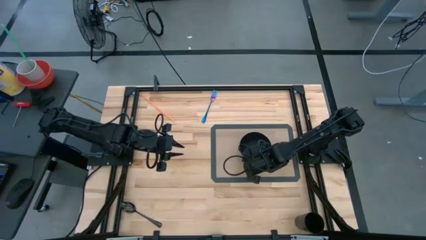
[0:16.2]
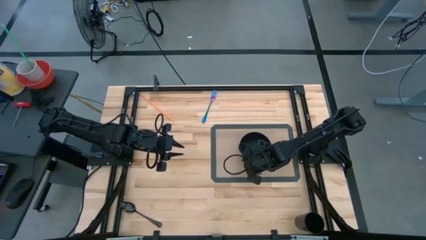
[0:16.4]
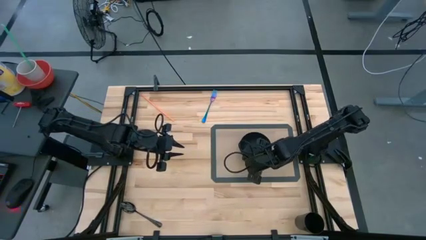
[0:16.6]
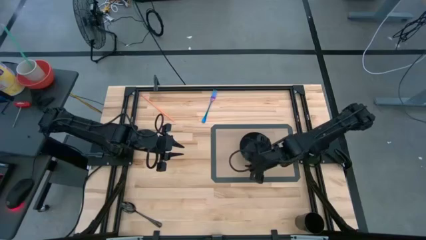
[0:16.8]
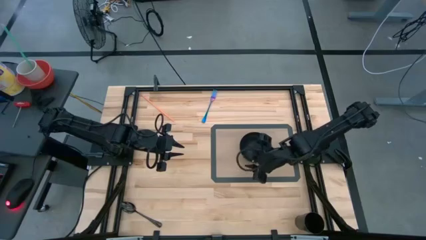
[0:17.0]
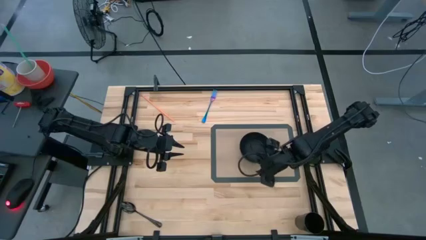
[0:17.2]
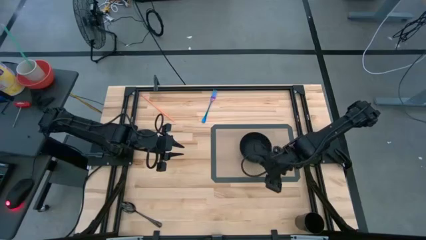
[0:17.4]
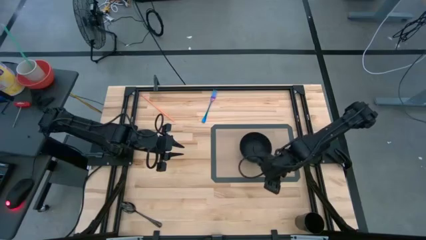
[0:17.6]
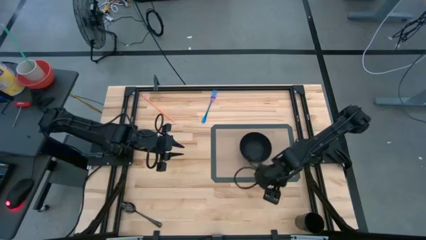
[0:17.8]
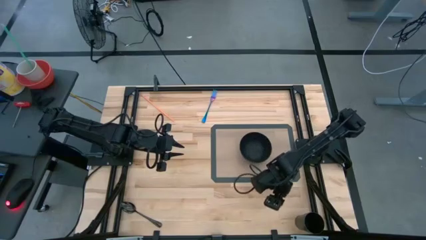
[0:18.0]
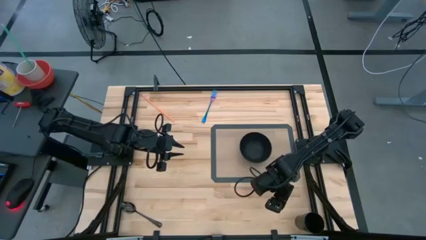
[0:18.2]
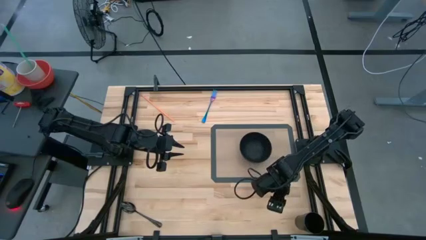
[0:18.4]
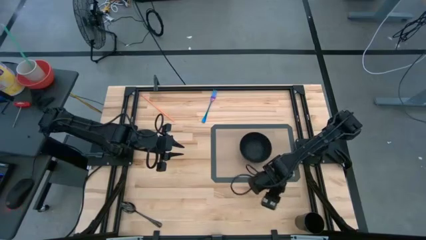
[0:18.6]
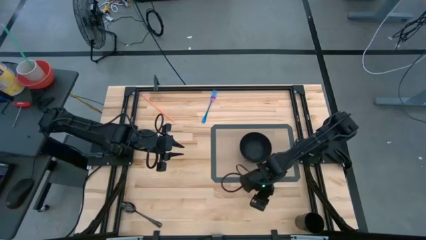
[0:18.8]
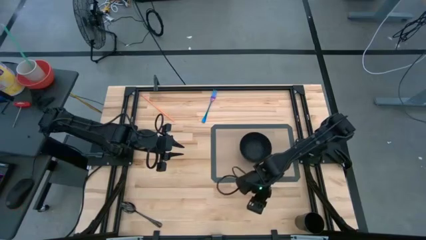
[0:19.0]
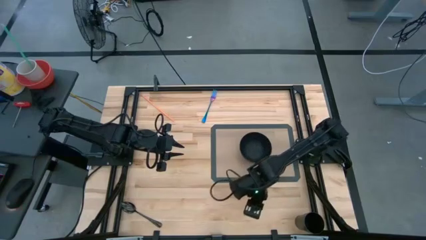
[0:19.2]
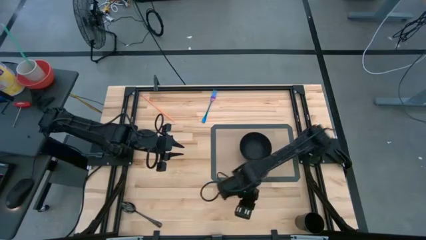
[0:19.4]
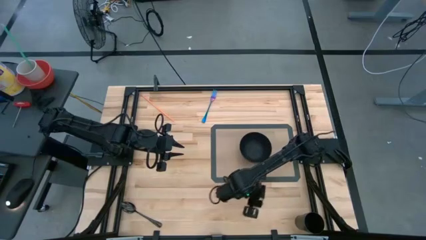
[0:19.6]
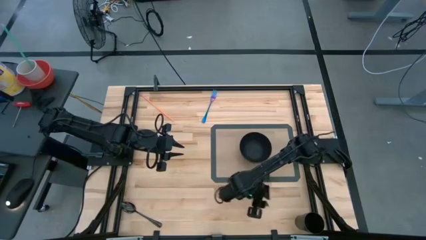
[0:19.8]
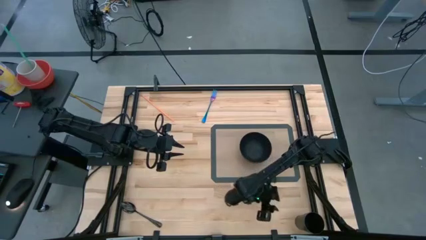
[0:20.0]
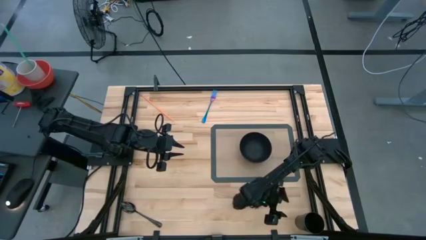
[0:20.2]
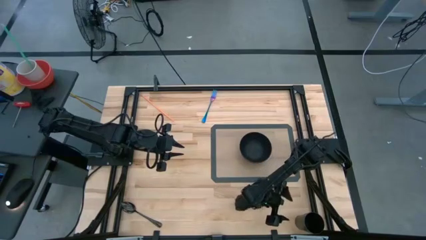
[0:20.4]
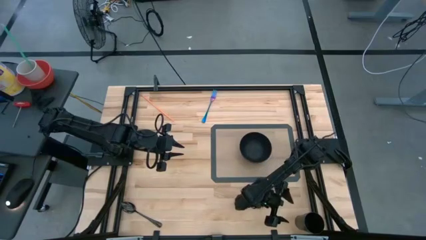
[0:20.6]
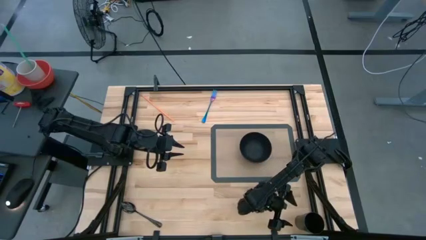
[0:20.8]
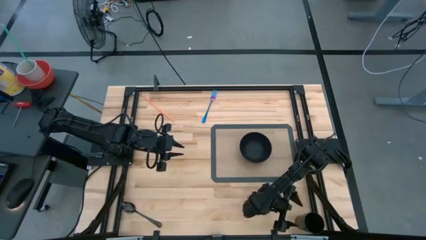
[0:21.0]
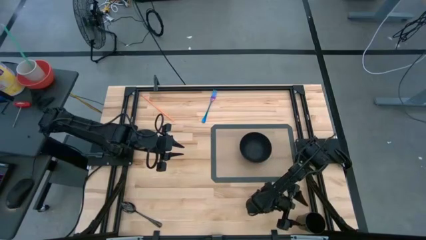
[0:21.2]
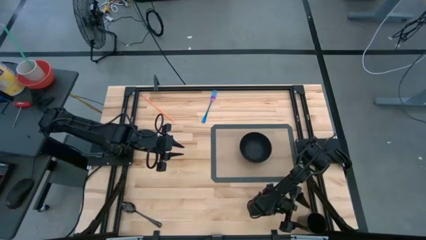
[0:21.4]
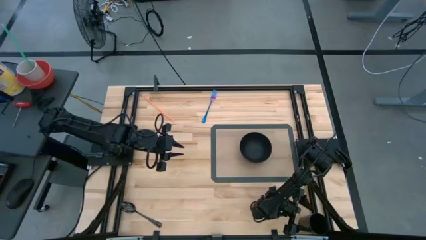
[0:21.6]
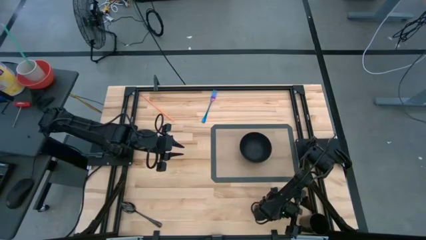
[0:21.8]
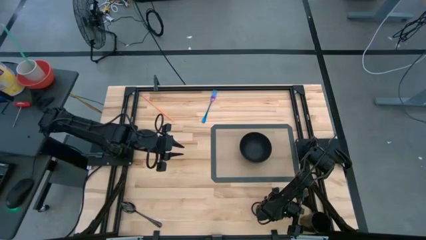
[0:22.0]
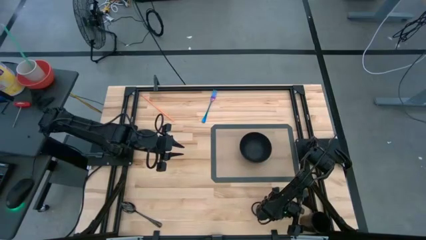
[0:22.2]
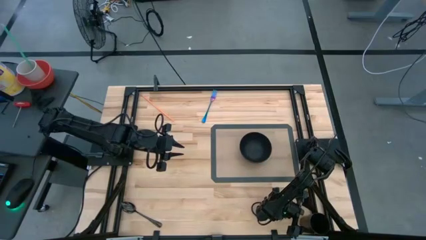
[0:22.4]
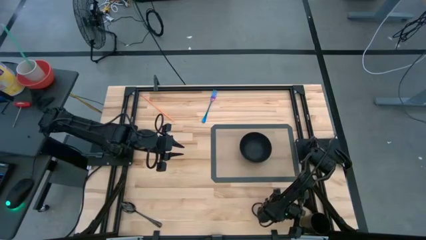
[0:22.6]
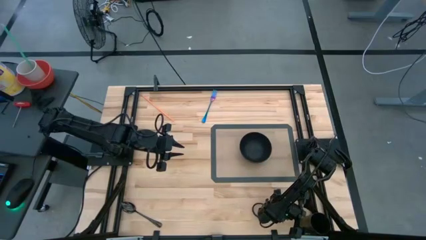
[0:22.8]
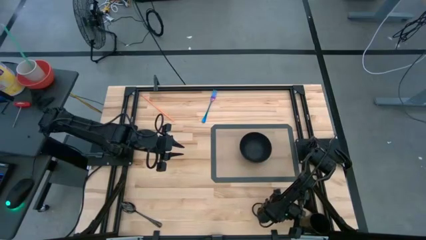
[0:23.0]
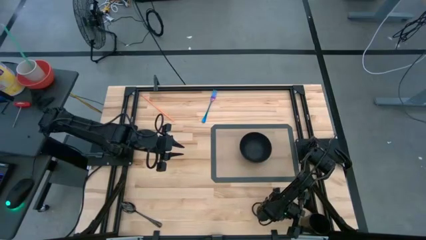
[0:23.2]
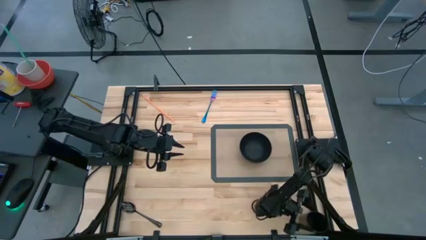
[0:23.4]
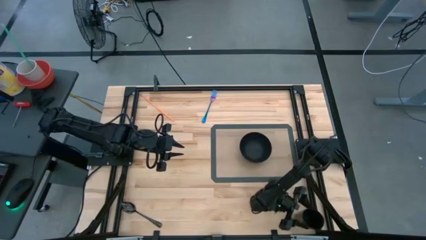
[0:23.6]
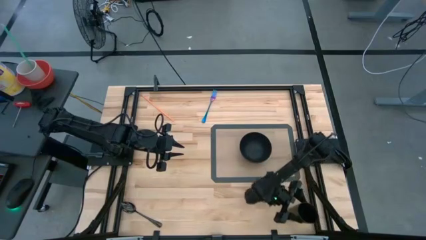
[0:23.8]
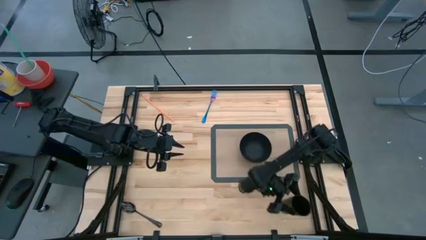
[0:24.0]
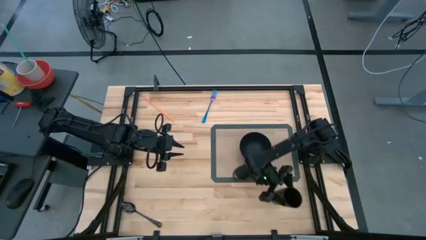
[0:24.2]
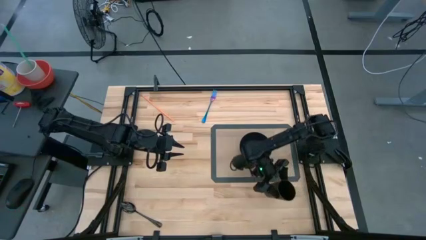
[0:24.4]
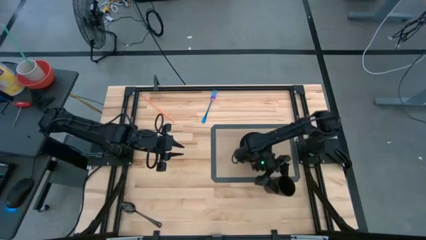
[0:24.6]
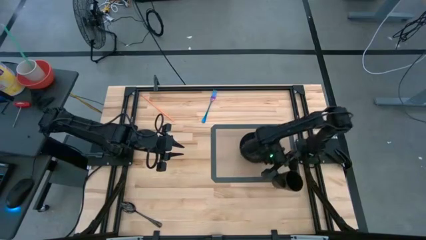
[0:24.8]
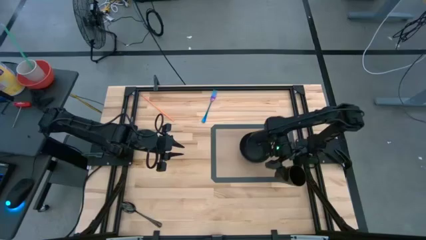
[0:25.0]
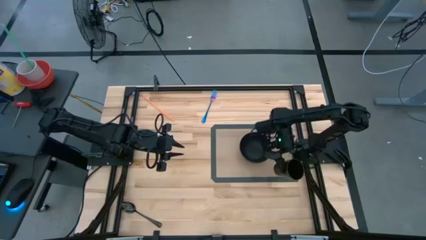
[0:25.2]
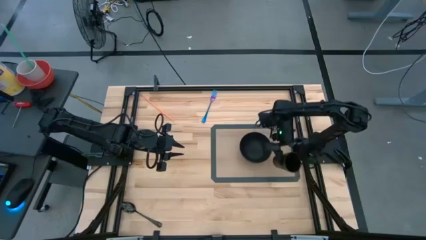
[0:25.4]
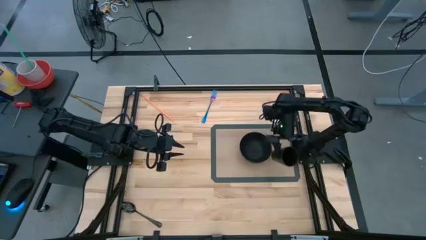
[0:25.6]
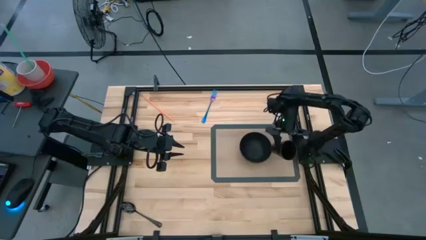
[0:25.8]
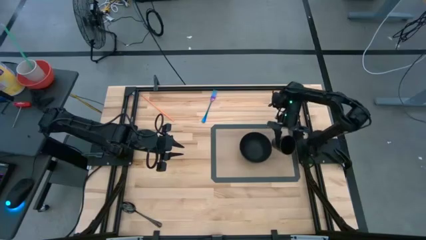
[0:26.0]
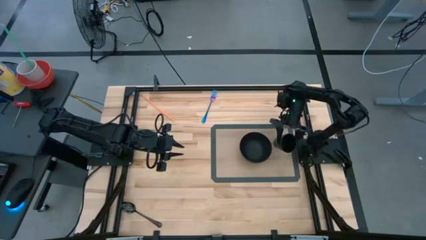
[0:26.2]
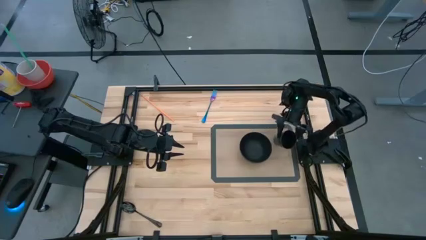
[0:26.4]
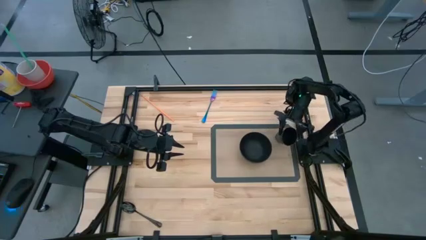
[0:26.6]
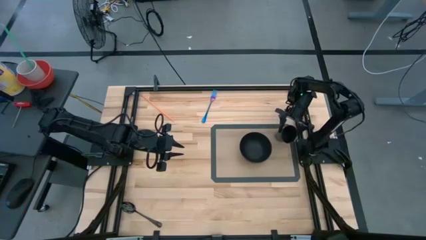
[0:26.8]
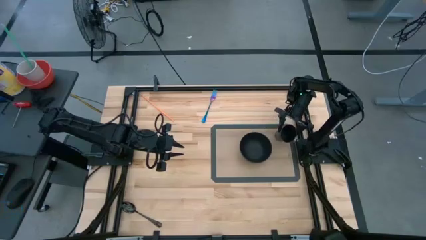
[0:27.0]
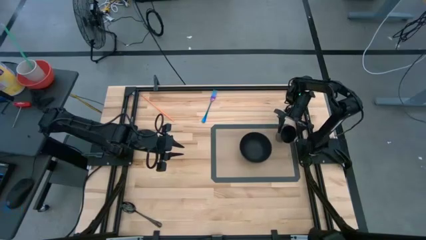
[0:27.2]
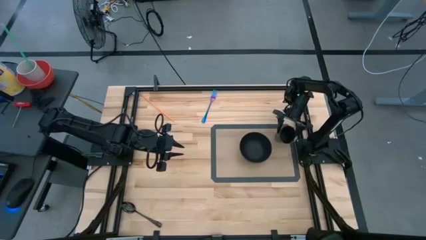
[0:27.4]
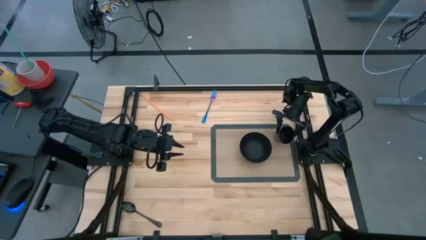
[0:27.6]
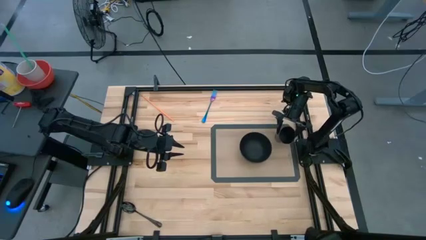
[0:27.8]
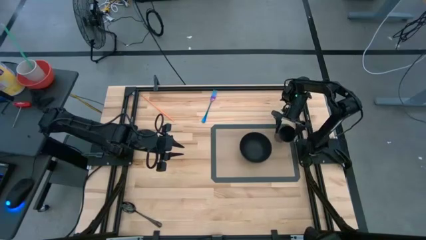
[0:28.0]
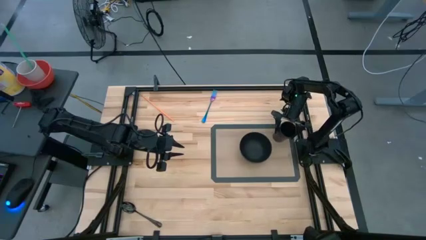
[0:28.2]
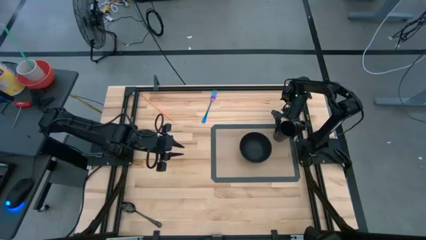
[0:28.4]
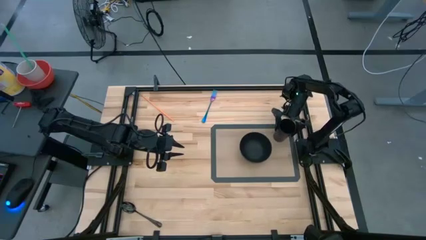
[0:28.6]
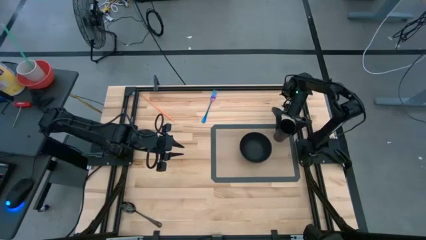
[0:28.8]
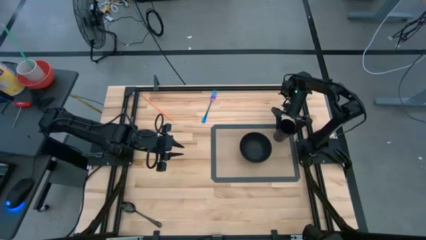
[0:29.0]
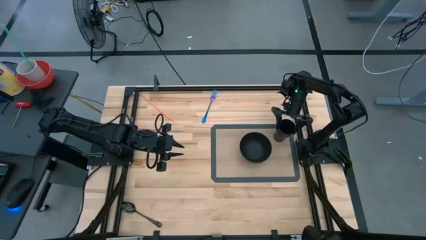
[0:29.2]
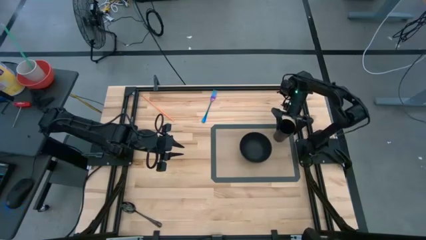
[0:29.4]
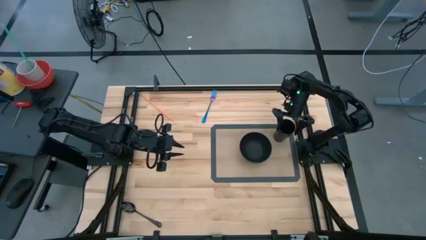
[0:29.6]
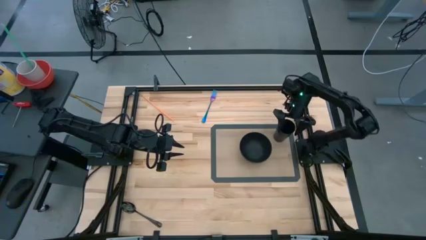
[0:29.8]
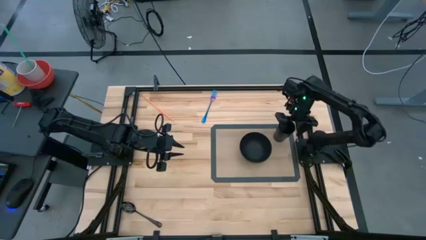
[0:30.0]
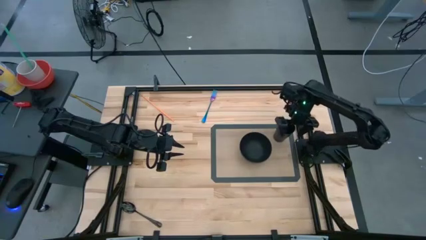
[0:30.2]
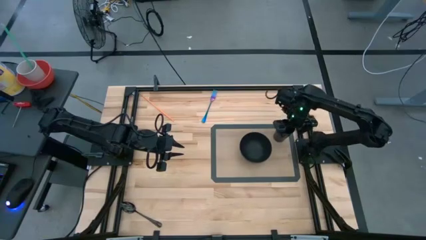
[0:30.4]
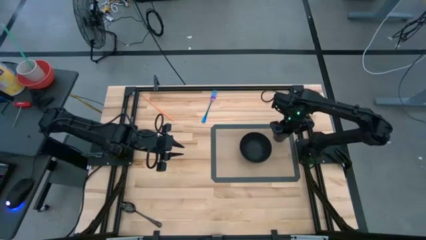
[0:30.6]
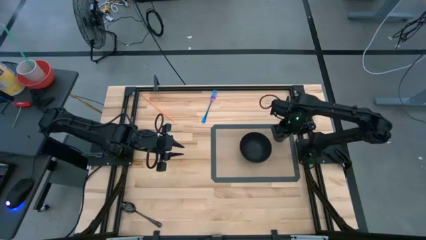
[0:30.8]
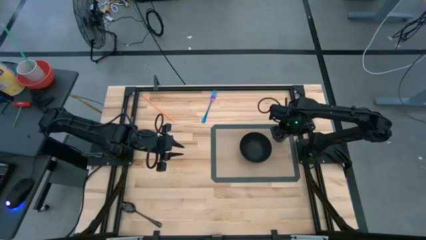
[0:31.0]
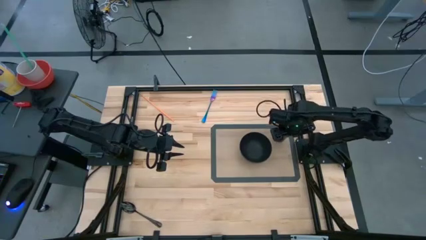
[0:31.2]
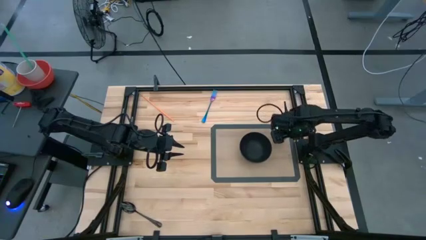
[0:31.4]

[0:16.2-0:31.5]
Task: Pick & Place Utensil
Put the black cup on the mat to the top right of the black bowl
